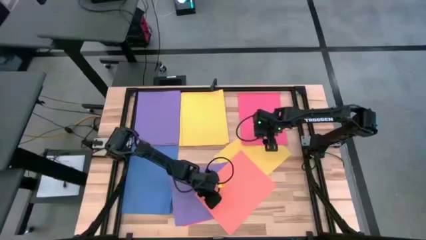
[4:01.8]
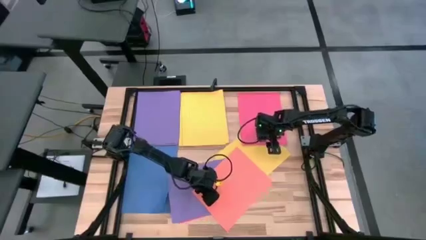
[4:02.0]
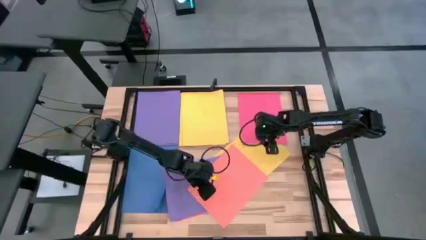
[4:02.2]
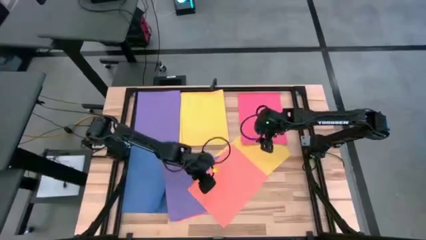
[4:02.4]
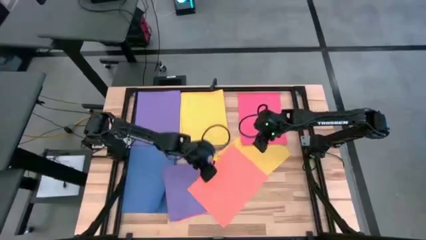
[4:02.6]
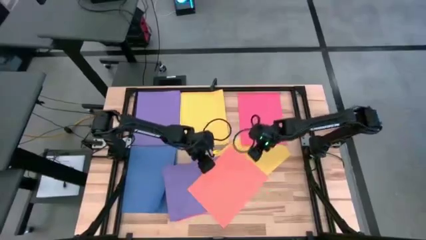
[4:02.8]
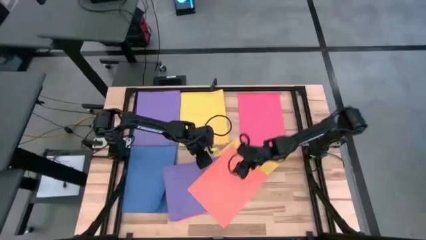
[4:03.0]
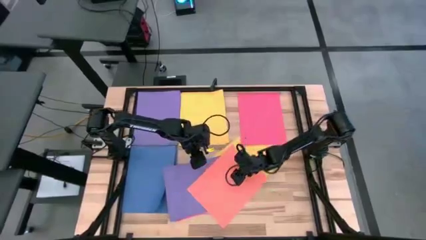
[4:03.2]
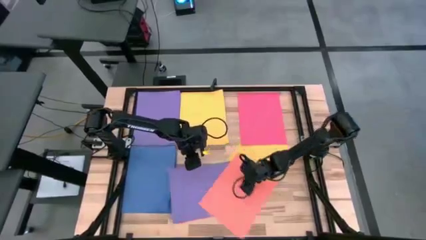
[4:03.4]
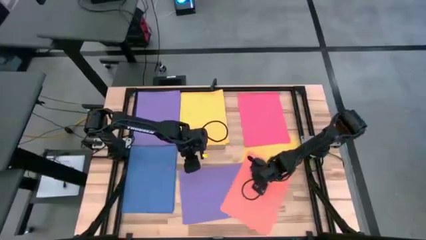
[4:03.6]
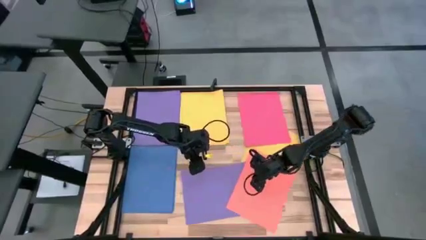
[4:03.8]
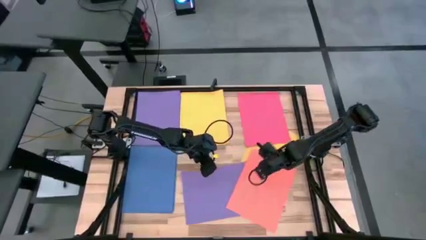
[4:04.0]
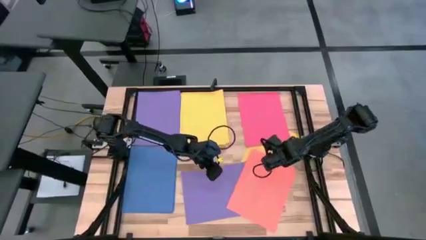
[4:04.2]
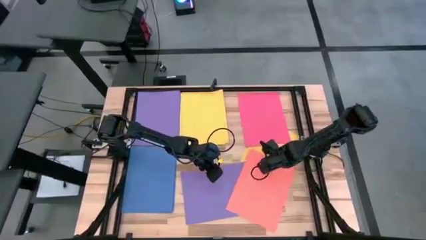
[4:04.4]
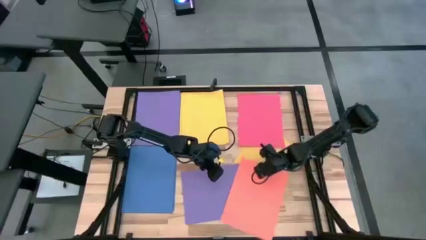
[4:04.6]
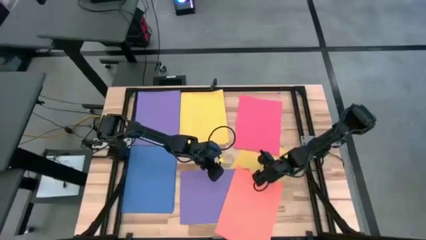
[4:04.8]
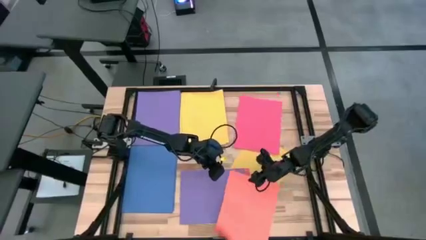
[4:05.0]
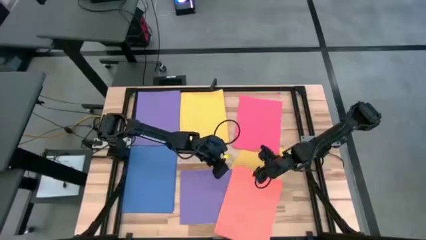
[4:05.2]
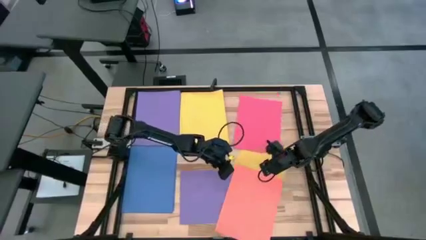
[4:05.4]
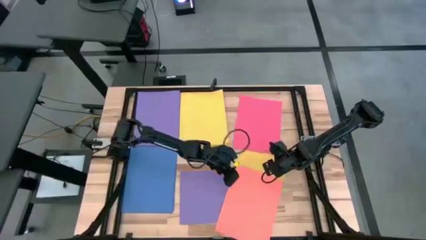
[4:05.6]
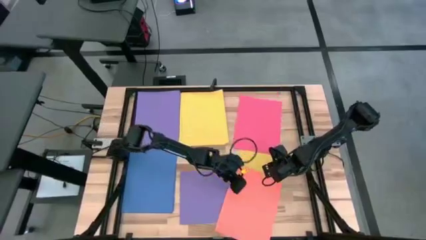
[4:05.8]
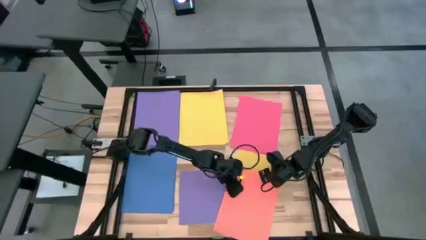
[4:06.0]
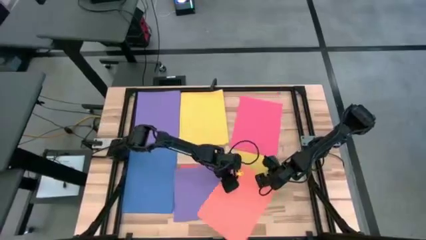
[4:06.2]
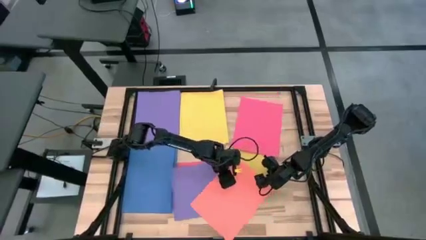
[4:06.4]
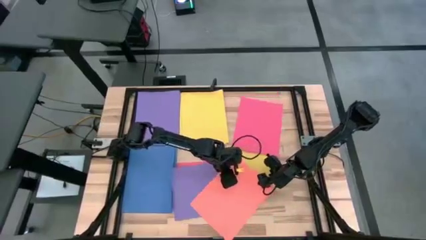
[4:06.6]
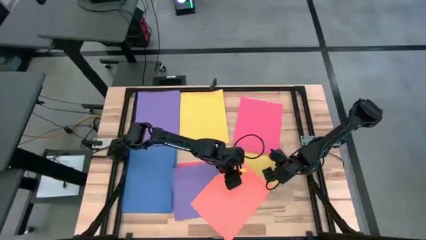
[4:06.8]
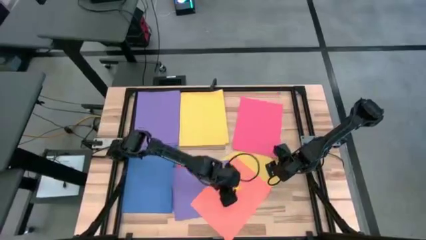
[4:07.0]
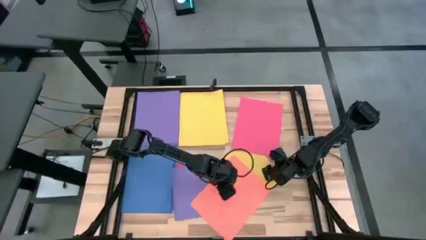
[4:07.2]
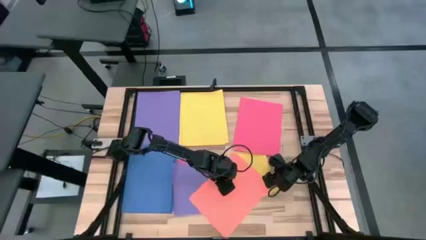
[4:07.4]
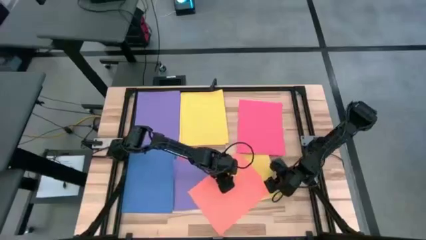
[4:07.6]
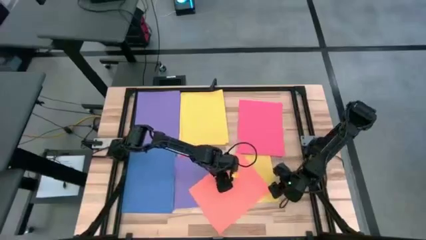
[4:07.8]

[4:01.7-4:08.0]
Task: Organize paper
Adjust the colored papers on the table

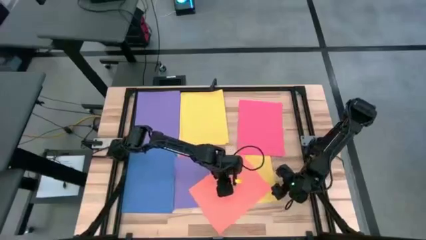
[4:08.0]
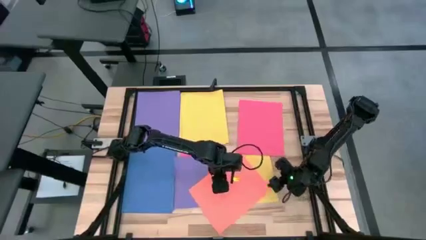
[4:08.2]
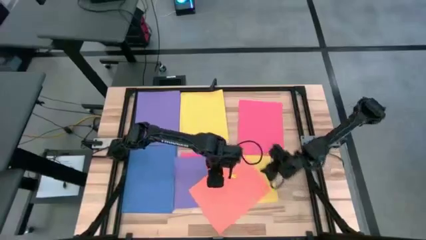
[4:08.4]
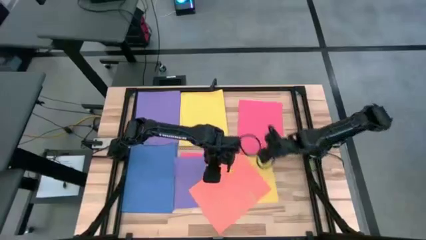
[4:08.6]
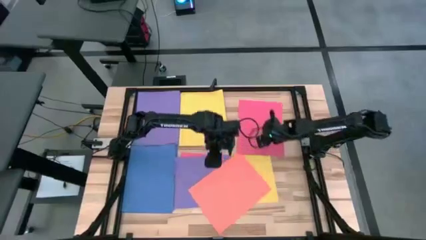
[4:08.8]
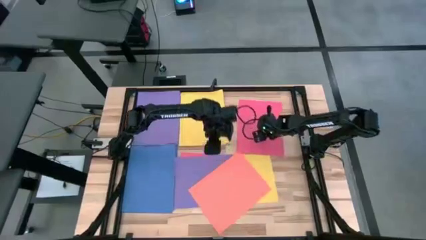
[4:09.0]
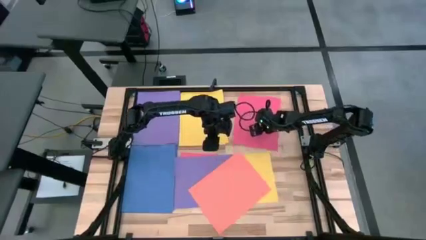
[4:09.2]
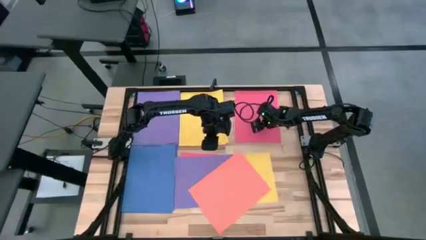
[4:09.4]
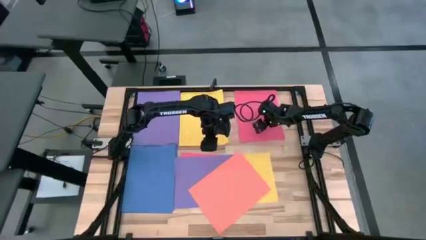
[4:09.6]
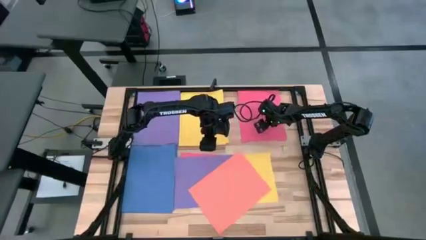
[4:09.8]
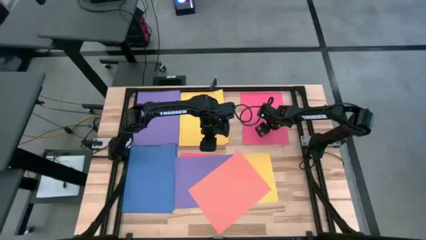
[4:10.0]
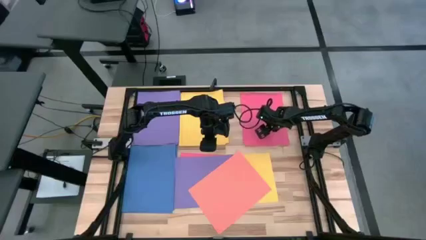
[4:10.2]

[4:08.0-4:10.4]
Adjust the red paper on the table

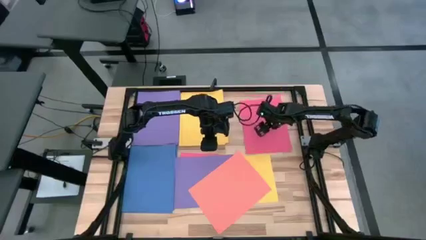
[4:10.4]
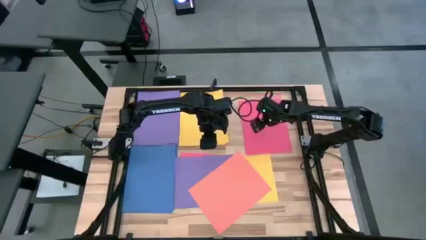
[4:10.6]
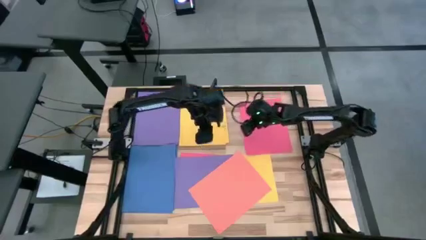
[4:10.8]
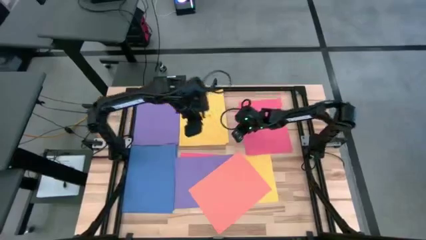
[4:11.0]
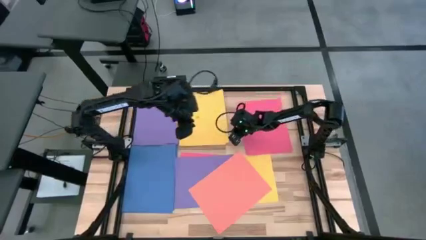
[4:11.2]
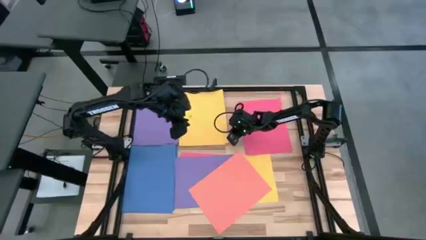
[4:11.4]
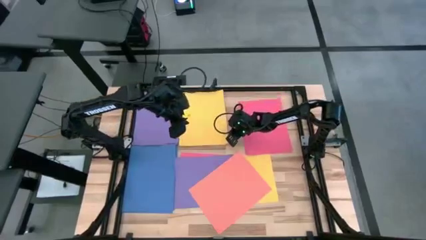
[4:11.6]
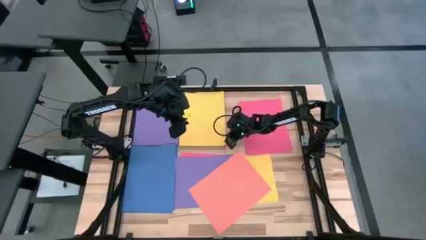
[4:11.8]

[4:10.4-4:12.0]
Adjust the yellow papers on the table

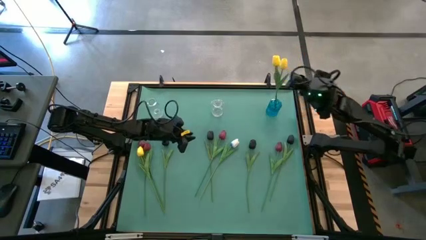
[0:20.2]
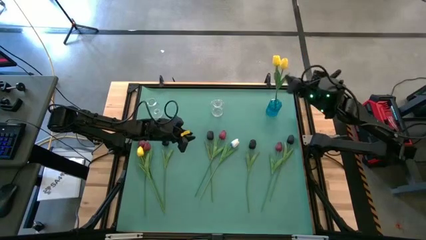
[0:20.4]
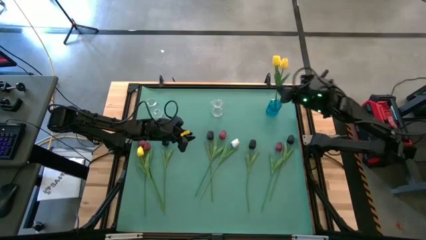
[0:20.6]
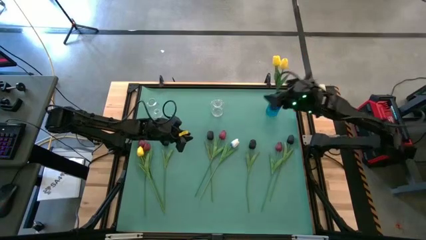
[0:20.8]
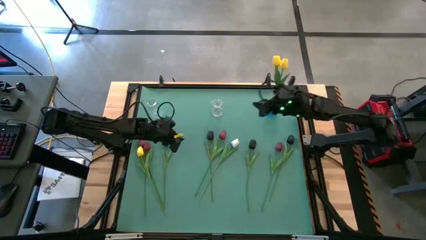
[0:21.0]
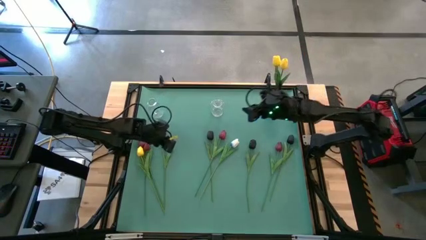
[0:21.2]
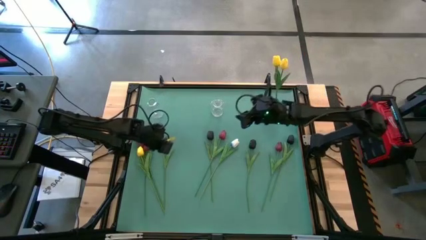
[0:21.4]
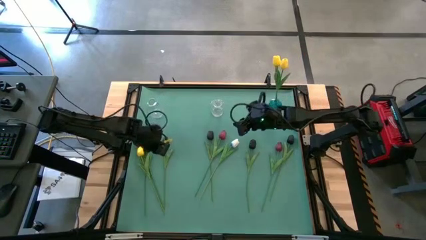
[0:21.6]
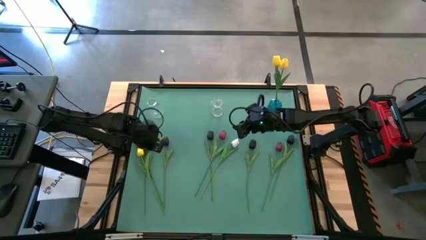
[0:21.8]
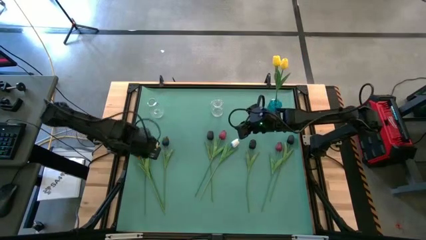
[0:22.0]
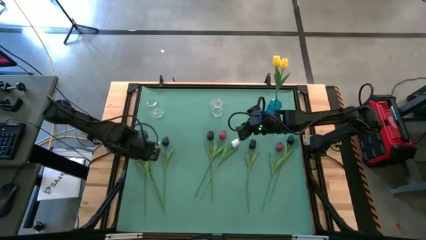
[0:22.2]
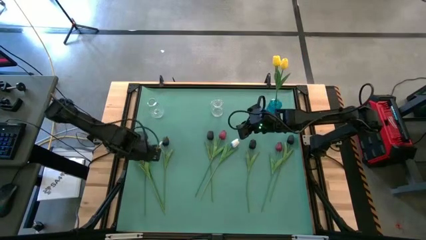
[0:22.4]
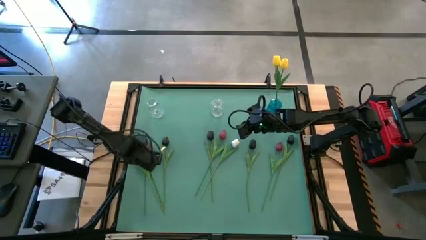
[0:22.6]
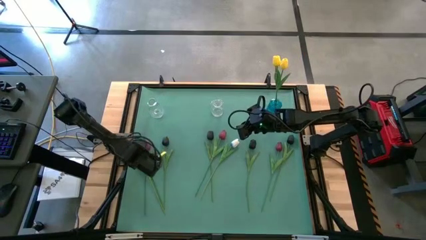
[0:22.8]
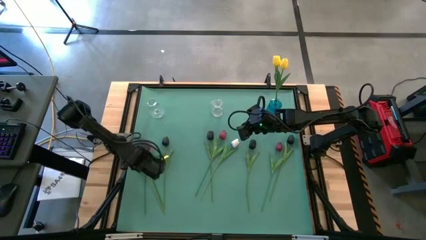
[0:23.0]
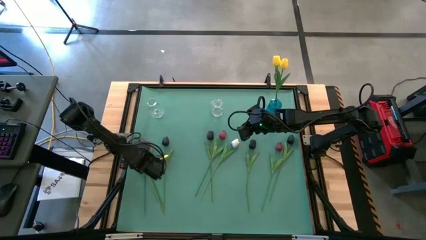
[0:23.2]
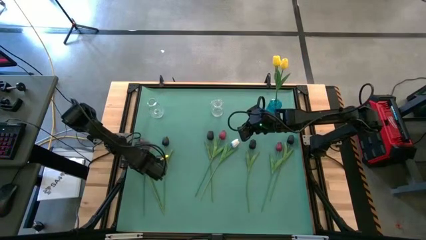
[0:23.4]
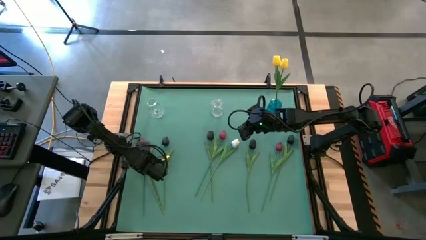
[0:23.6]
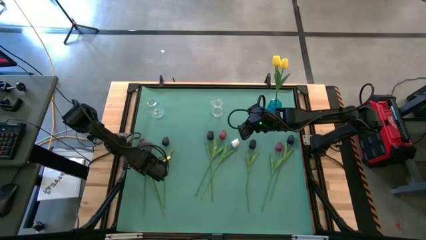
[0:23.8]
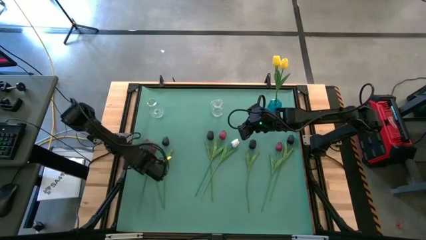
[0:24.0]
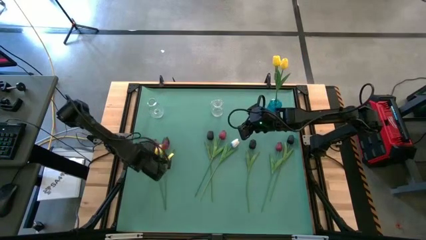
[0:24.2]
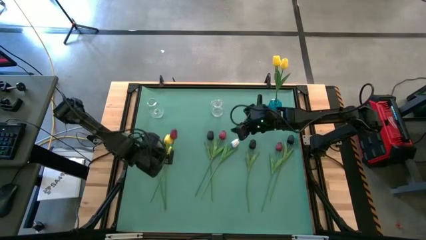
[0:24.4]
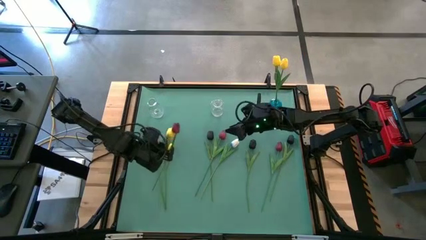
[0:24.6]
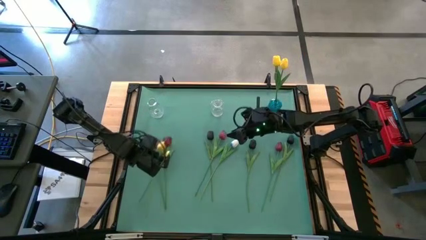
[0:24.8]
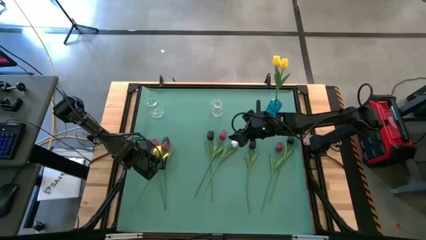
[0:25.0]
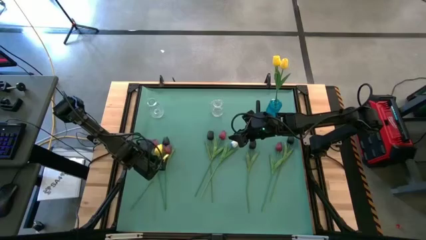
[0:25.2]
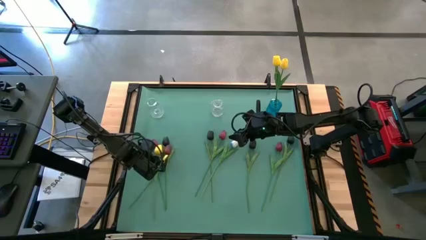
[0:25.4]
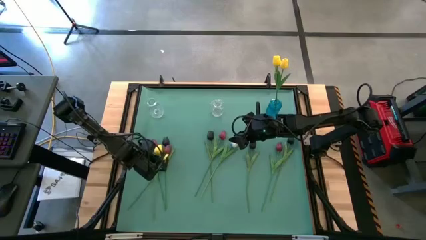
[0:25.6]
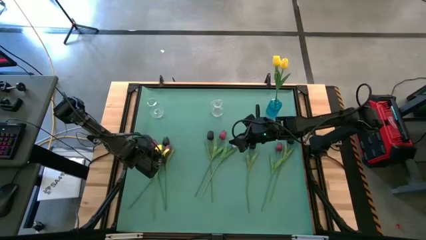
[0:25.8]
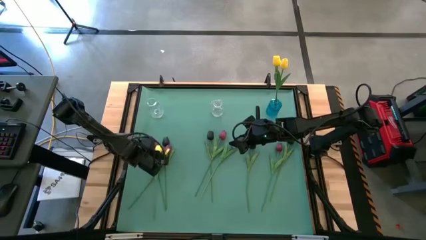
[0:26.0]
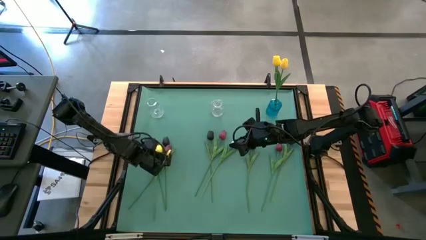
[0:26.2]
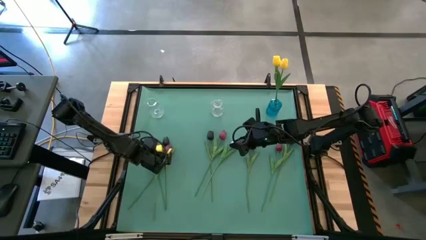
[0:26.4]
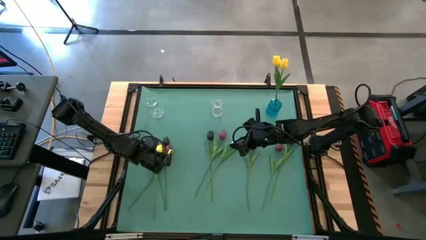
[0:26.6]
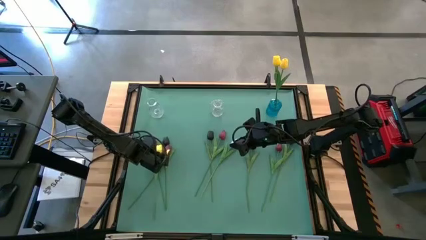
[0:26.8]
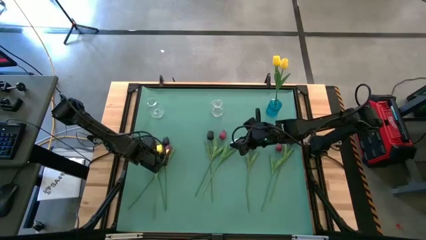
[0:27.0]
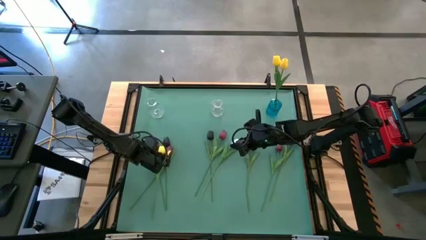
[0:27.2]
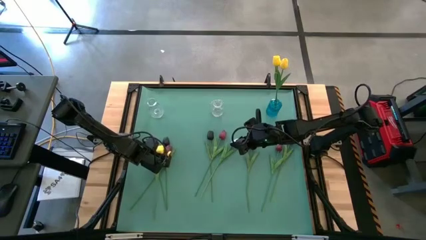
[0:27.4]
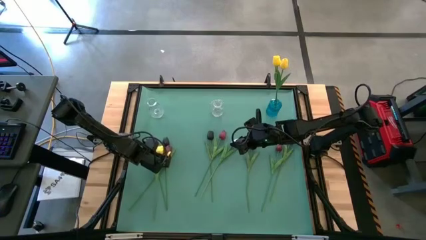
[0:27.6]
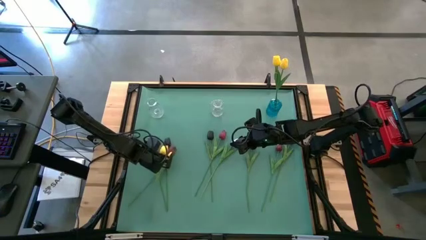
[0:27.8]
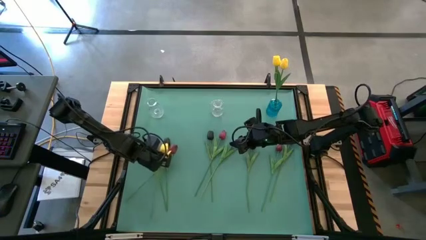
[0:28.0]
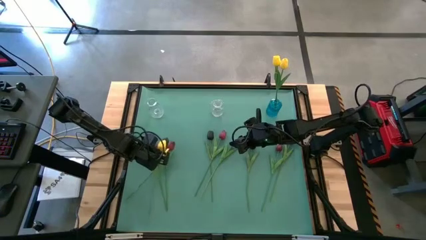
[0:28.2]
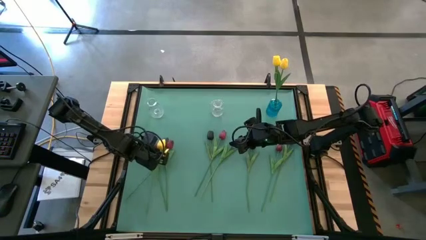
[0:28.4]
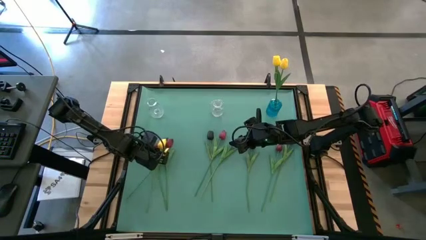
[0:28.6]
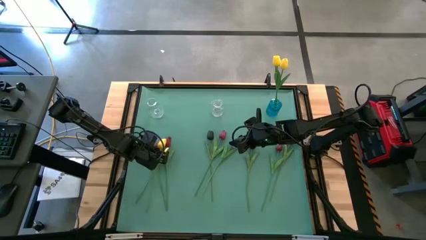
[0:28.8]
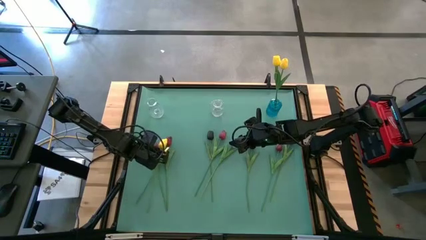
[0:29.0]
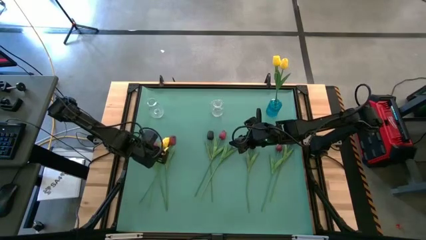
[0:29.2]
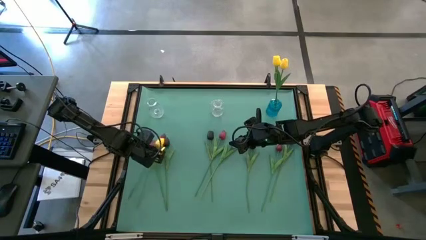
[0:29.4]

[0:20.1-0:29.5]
Task: Sort flowers into vase by color
Put the yellow tulip into the blue vase
